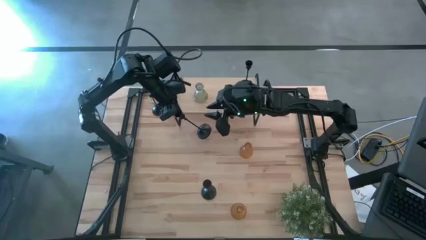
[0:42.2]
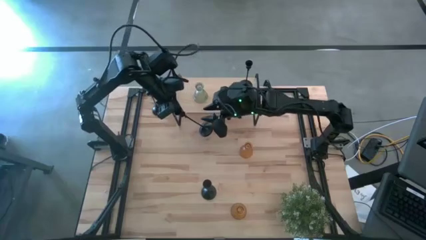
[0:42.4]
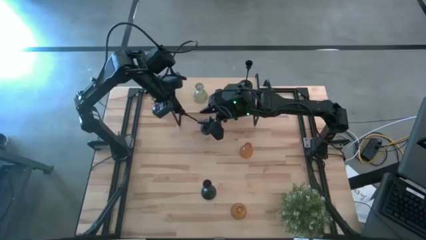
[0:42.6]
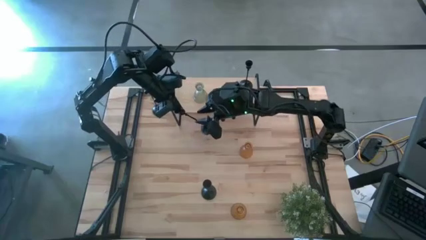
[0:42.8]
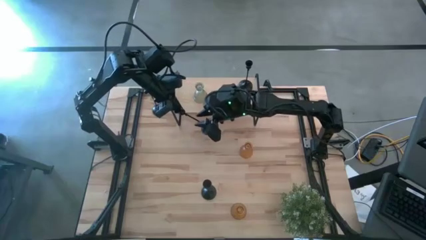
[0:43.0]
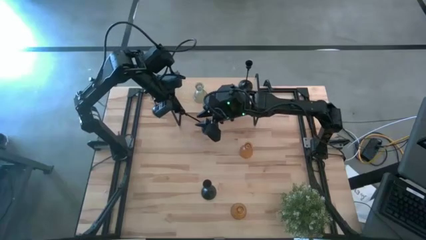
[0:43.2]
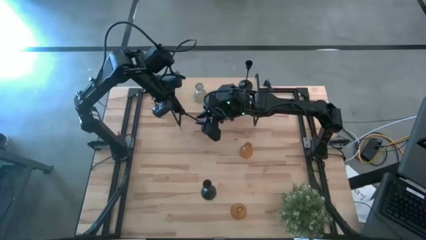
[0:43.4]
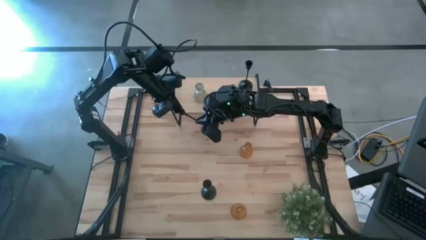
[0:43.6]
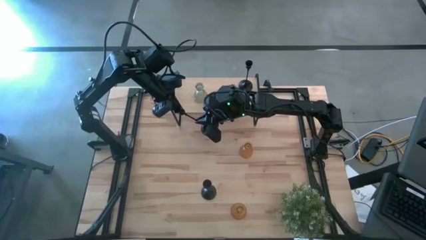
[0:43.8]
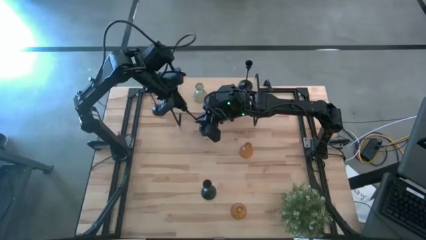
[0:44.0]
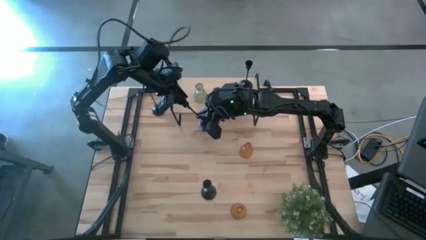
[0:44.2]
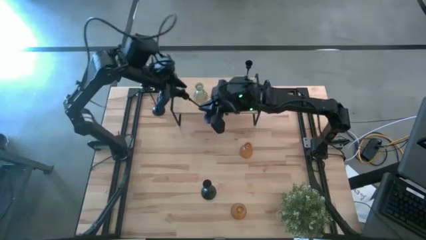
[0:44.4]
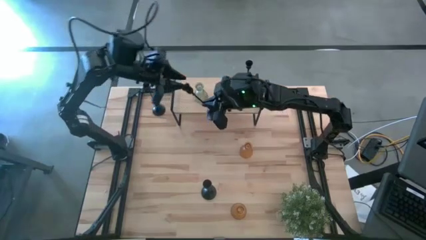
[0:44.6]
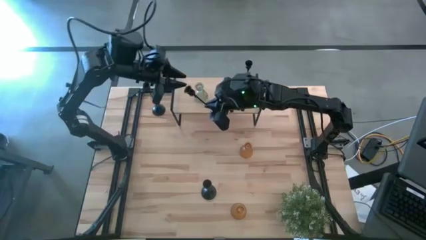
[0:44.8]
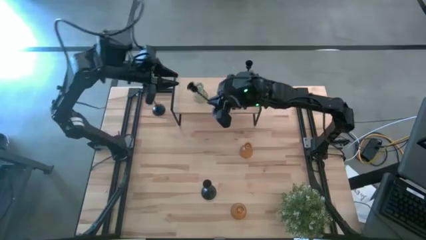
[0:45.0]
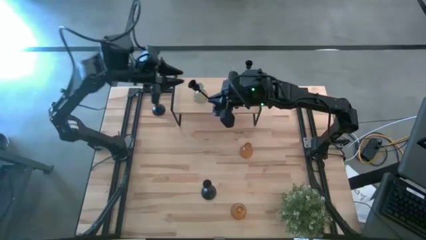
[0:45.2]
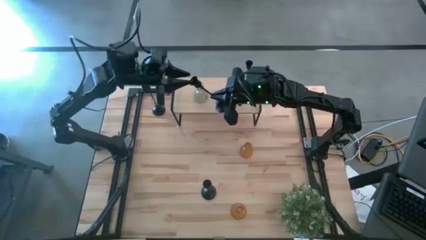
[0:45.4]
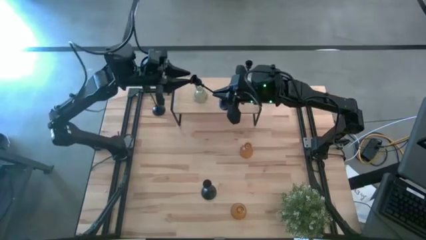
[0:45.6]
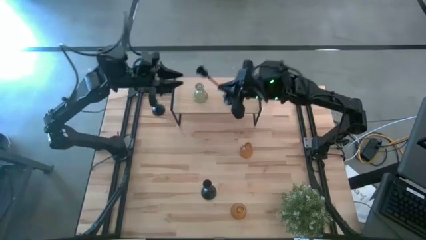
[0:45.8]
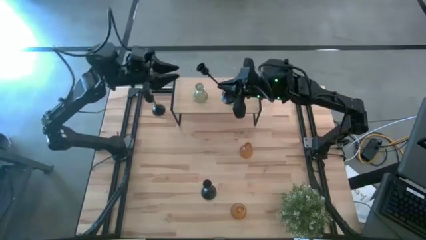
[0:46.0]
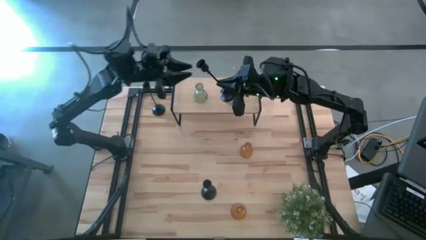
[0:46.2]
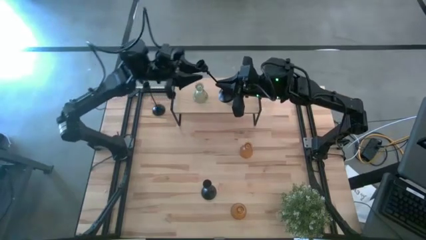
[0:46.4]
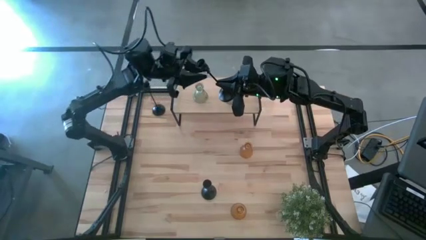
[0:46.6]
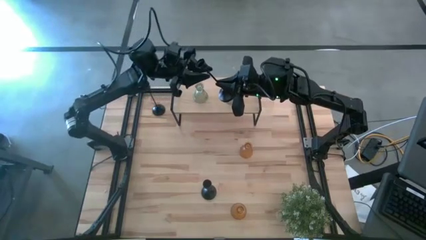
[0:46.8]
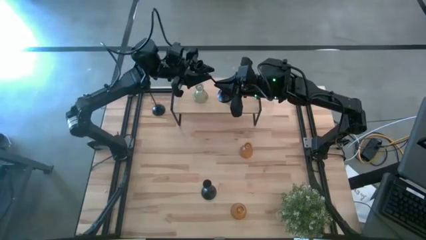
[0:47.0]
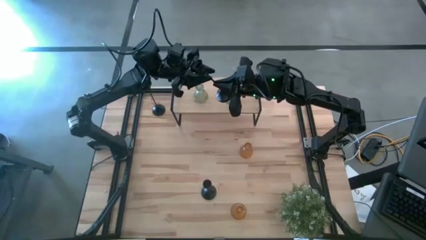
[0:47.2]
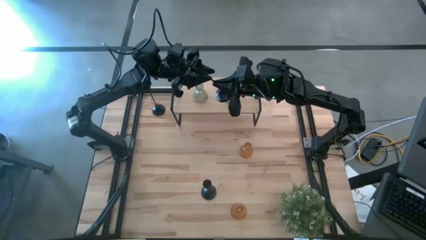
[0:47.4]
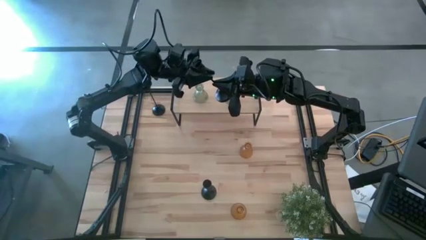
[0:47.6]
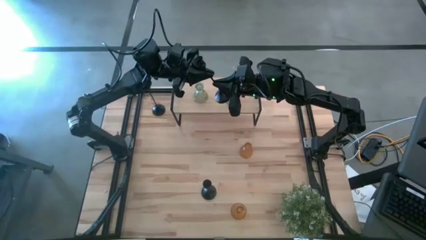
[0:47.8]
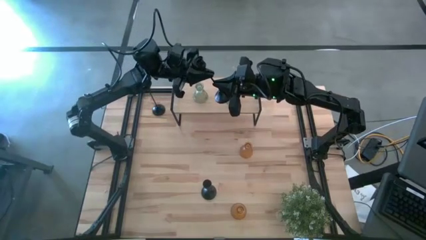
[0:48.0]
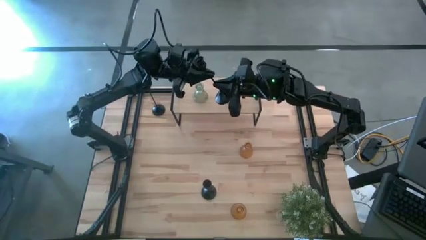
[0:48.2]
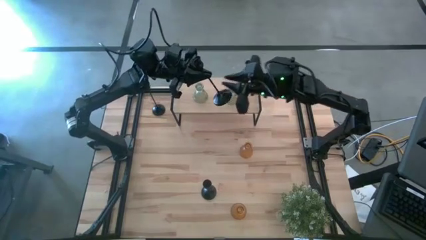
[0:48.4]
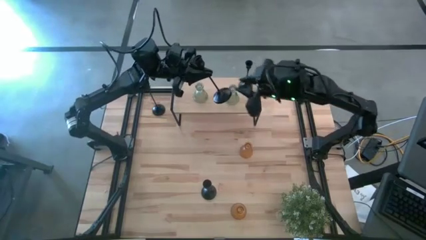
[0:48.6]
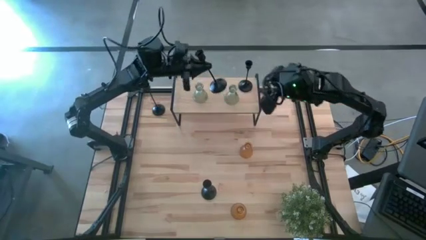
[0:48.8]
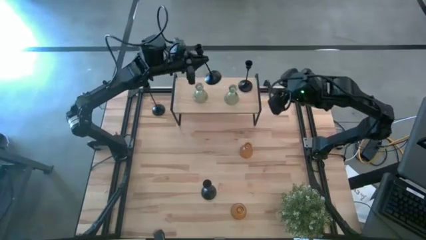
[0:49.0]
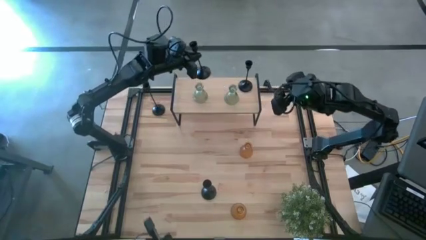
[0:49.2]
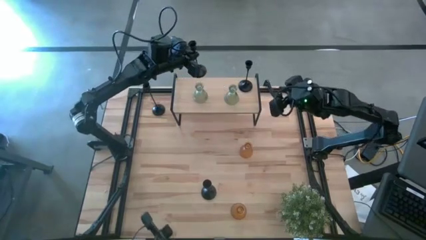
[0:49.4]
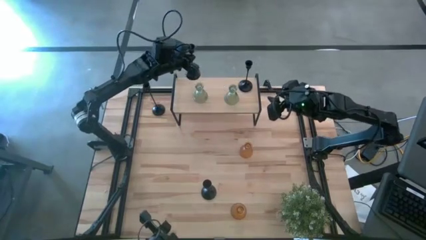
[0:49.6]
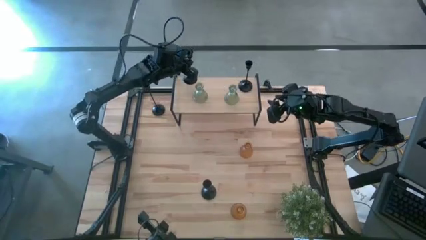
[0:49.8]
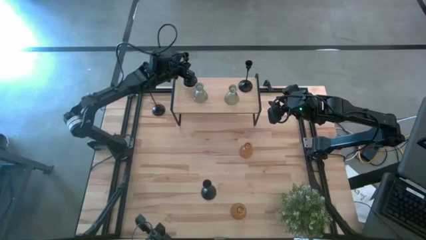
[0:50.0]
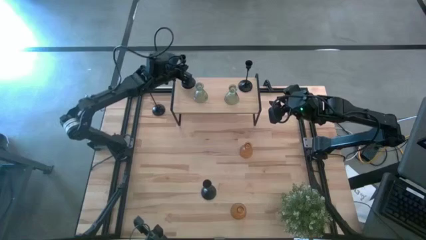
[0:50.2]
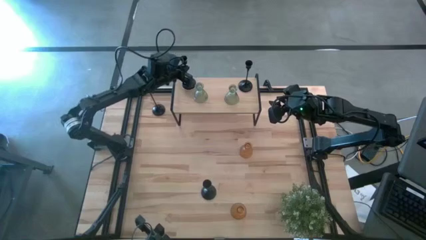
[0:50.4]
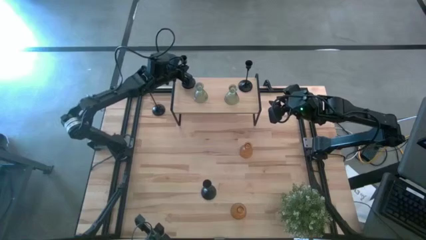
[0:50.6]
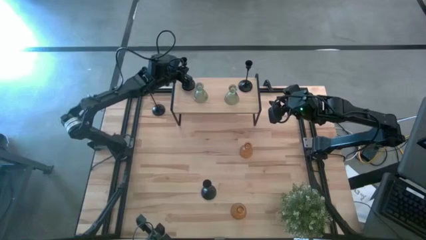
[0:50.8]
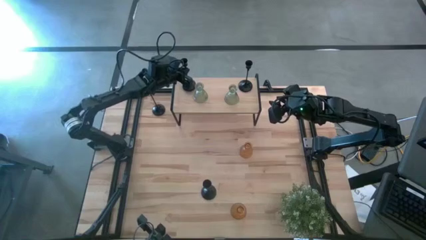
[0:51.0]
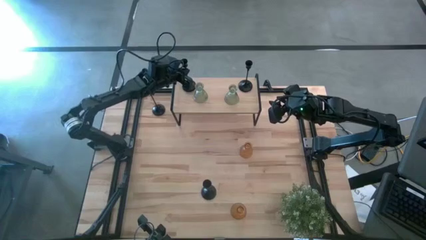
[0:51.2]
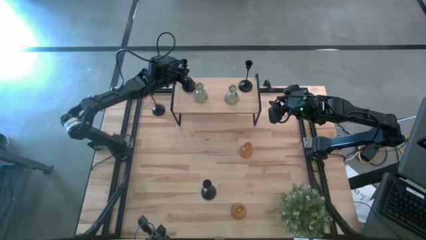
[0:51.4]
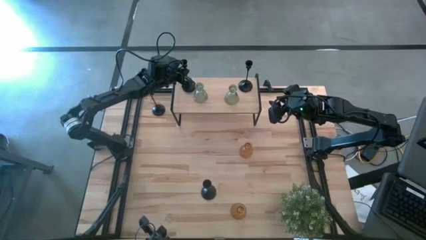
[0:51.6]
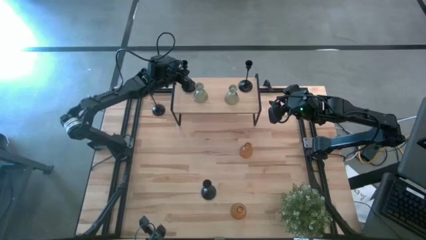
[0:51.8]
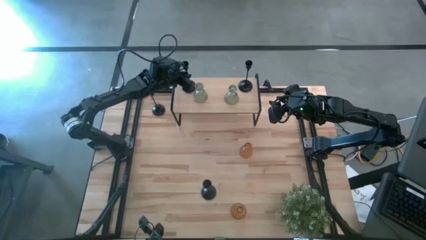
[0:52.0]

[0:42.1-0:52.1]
Task: Pick & Place candle stick holders
Put the black candle holder on the shelf

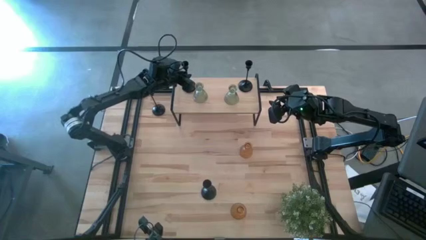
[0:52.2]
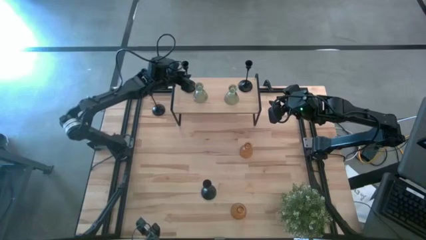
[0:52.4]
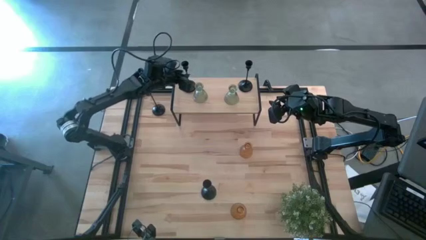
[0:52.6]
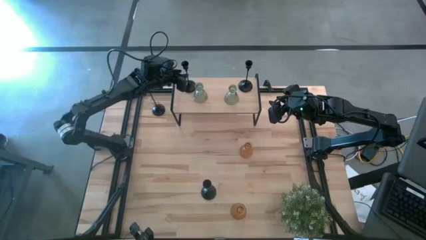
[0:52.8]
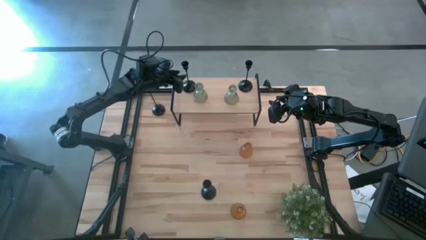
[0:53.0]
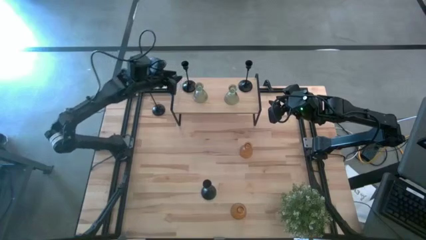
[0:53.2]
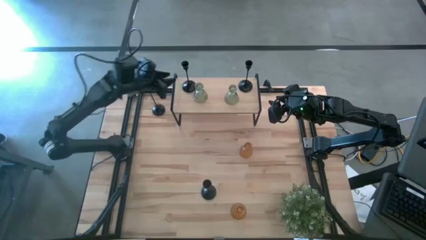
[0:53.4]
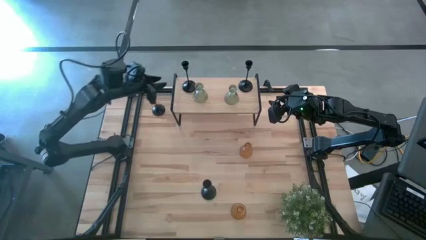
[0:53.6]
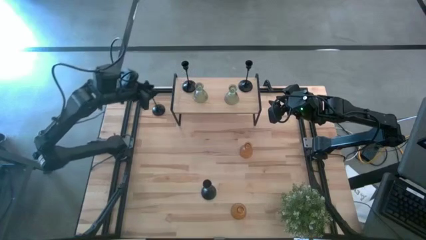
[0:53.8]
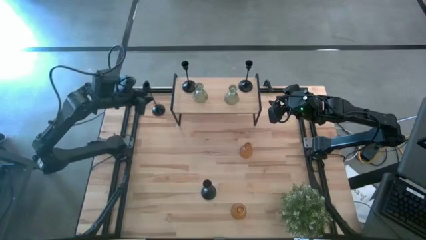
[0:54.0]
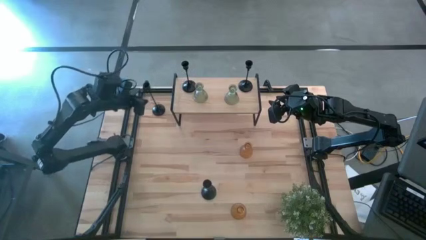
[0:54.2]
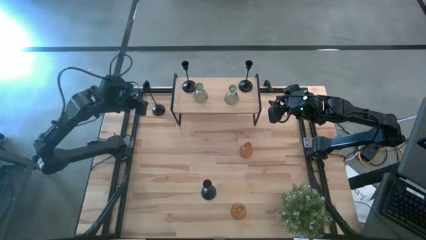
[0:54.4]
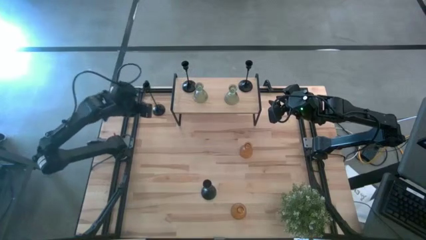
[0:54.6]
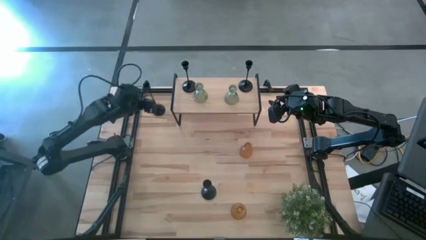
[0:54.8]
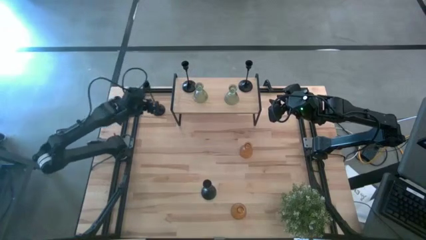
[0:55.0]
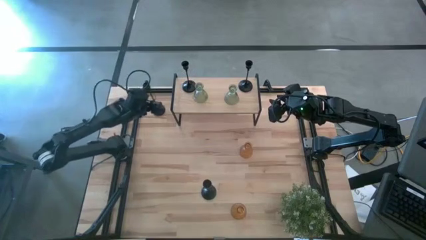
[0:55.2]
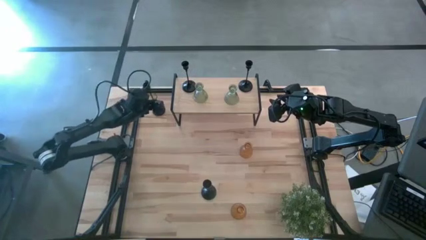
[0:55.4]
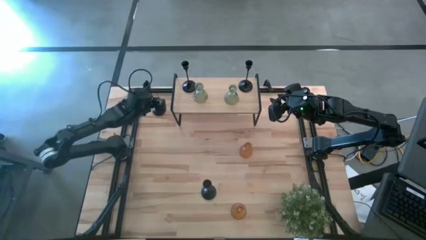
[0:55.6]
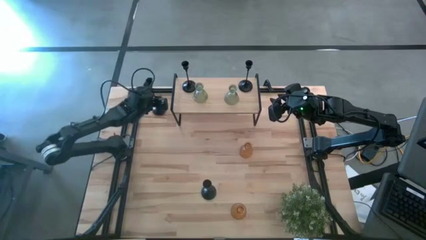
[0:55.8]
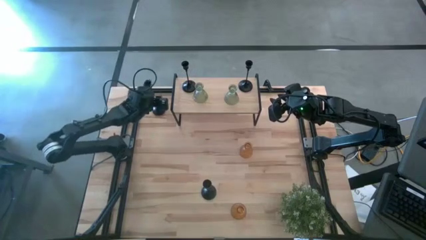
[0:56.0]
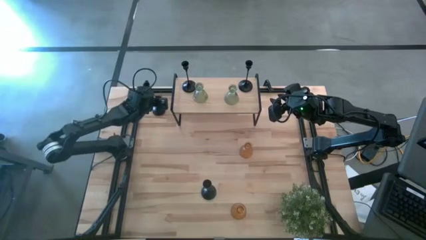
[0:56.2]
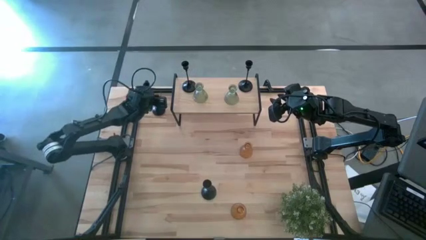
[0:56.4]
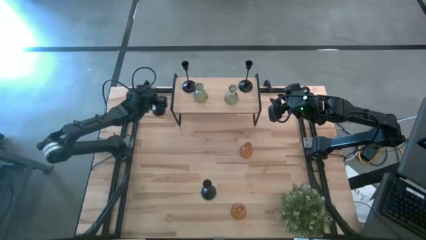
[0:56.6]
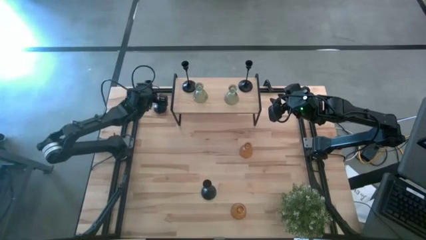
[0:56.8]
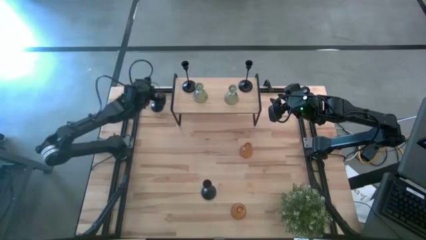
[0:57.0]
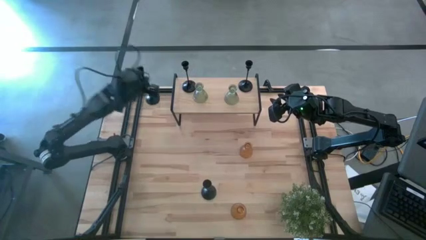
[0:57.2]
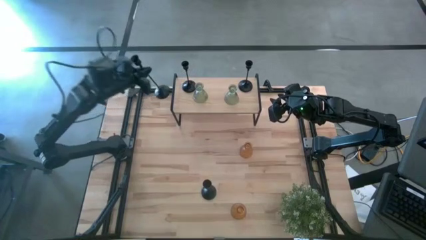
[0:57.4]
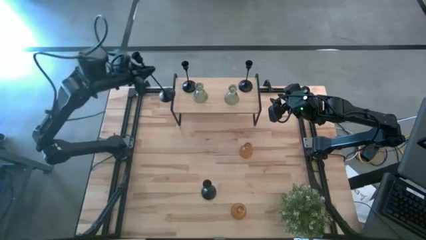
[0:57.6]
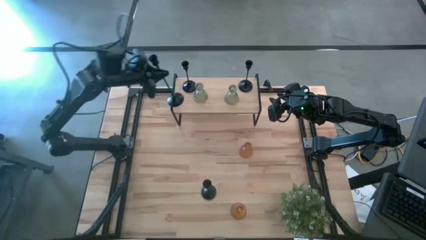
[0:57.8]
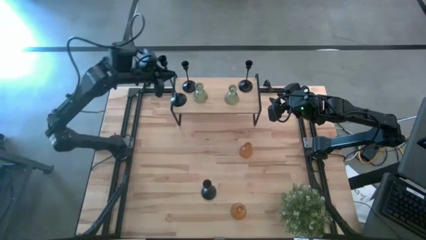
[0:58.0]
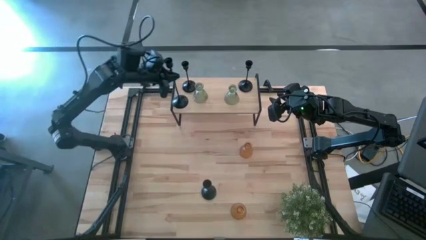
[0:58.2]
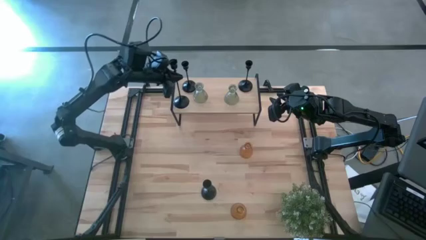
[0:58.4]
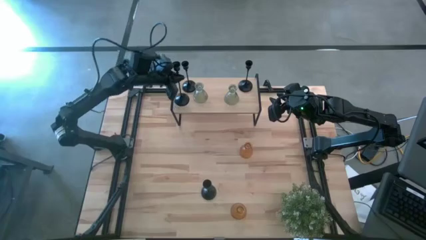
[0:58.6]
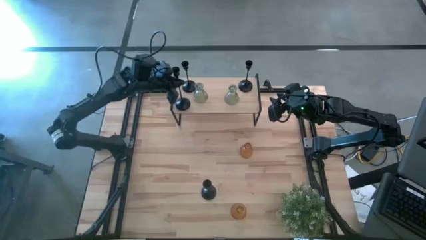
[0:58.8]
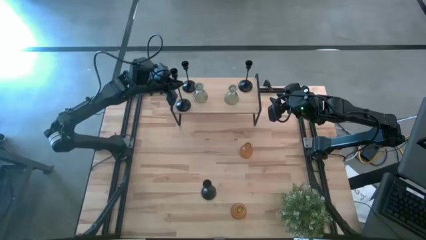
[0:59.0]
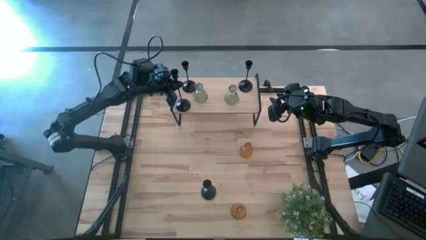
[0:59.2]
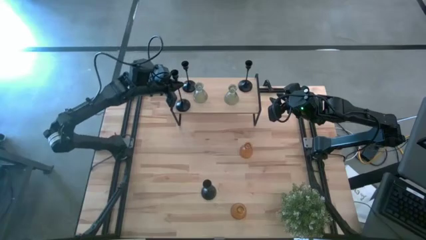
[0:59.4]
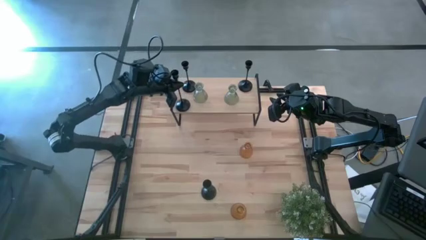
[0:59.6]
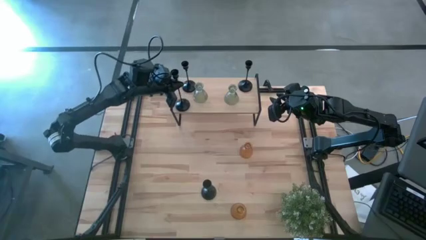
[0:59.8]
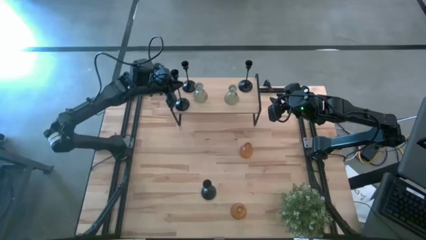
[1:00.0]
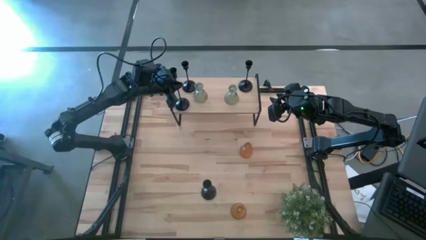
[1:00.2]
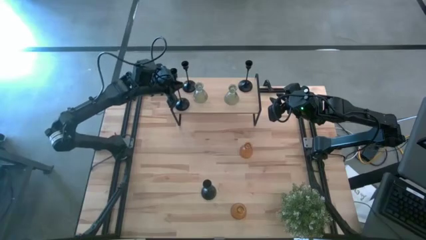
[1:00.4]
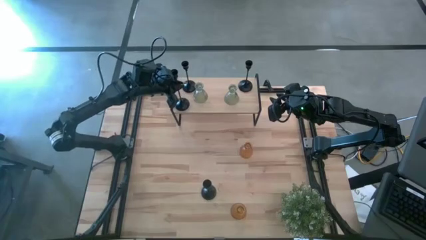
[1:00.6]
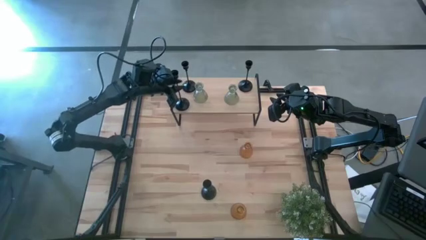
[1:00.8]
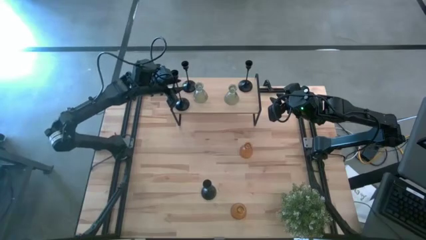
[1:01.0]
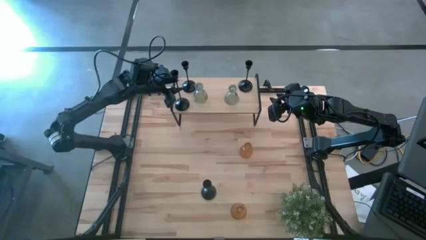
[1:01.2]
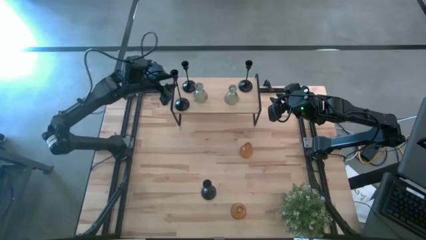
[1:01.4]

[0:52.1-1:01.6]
Put the black candle holder on the shelf
